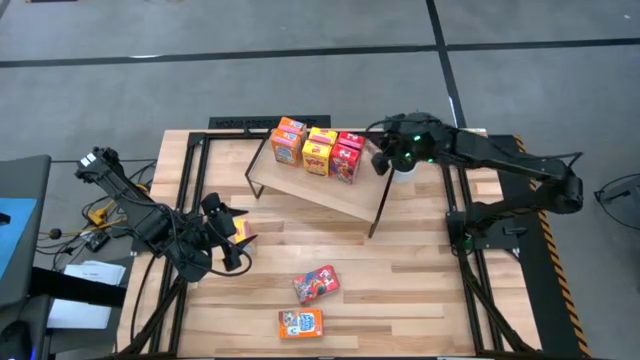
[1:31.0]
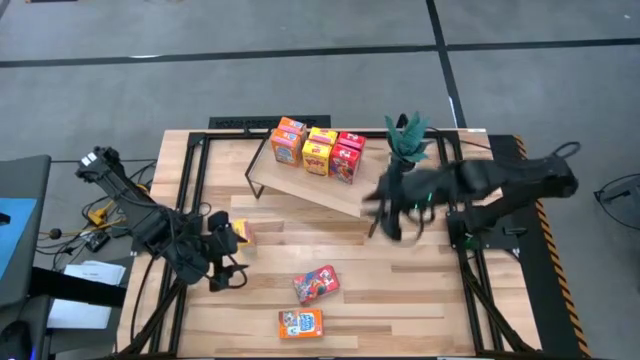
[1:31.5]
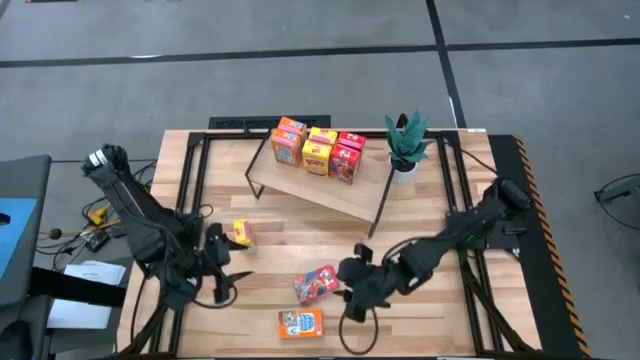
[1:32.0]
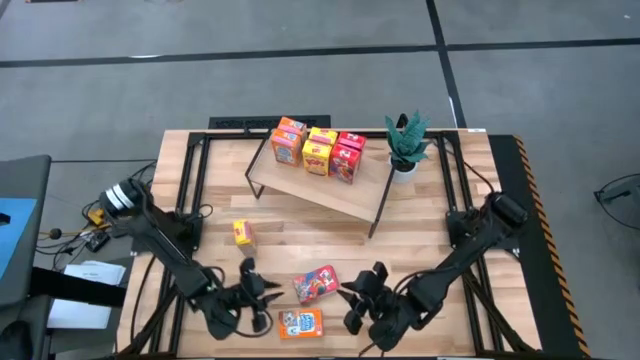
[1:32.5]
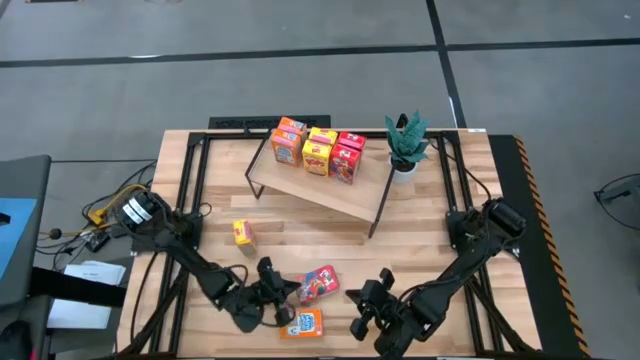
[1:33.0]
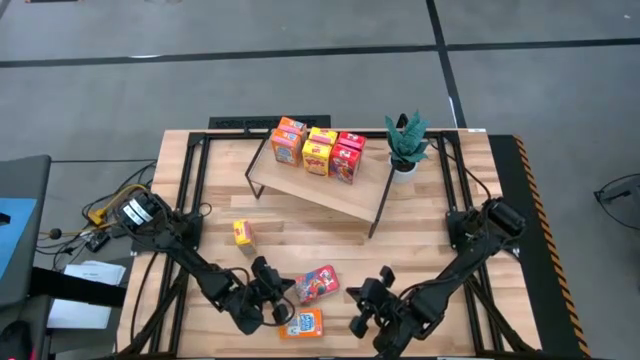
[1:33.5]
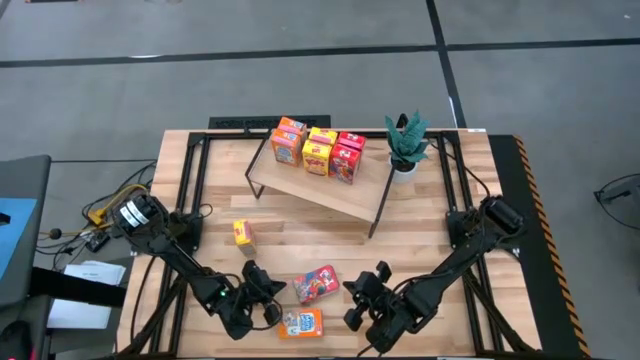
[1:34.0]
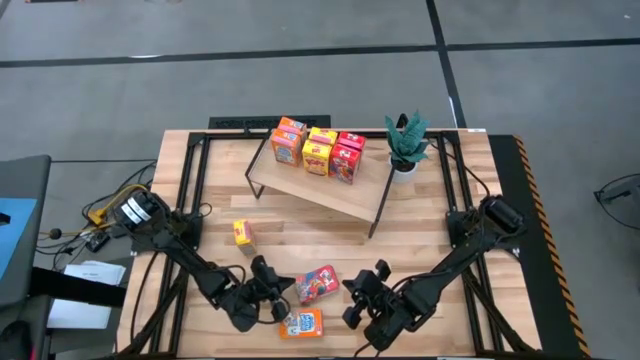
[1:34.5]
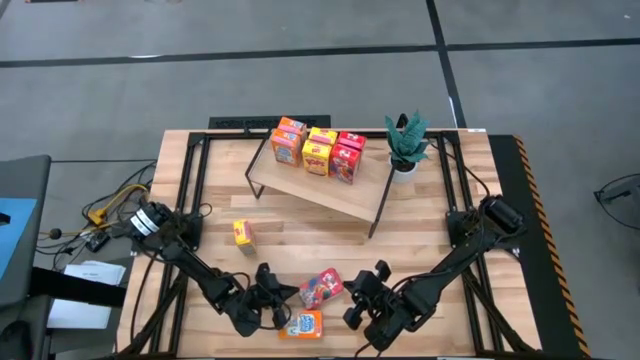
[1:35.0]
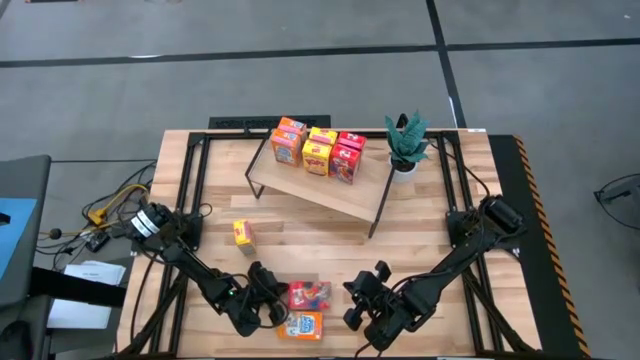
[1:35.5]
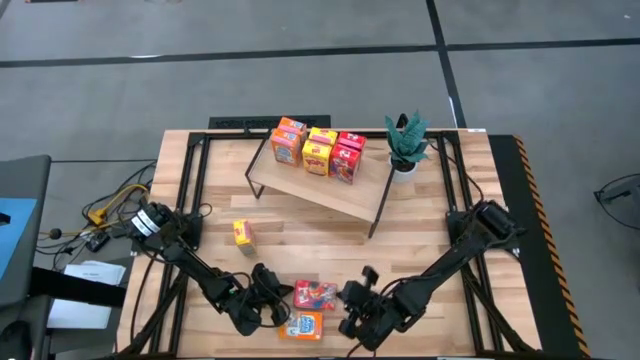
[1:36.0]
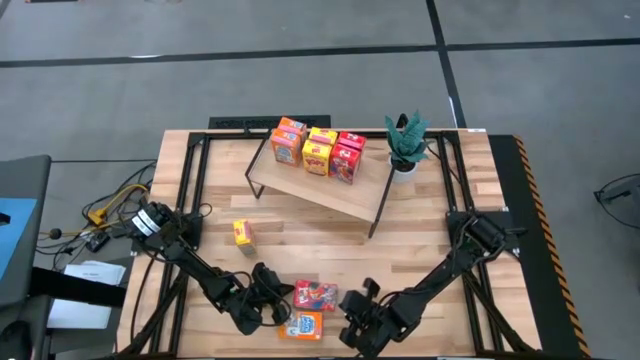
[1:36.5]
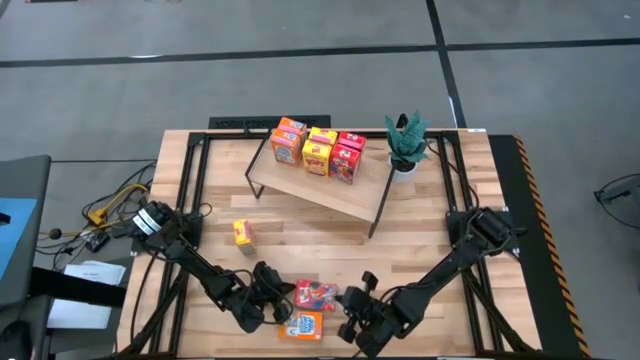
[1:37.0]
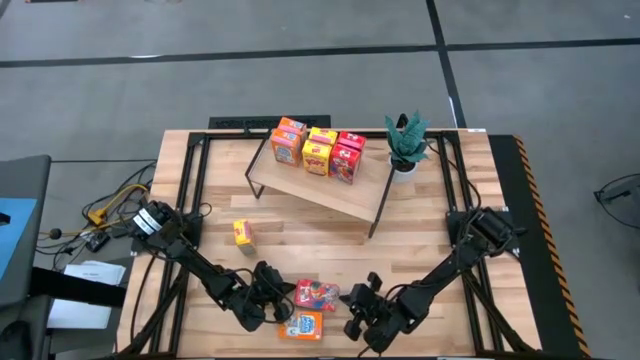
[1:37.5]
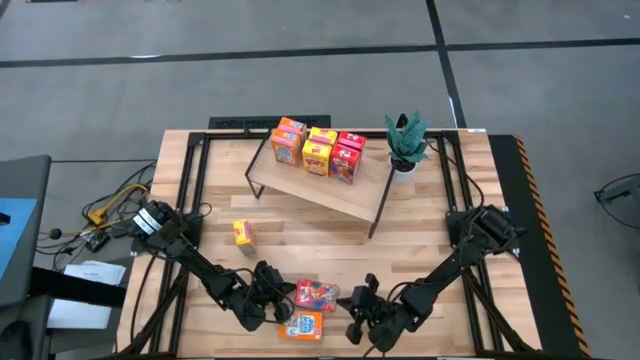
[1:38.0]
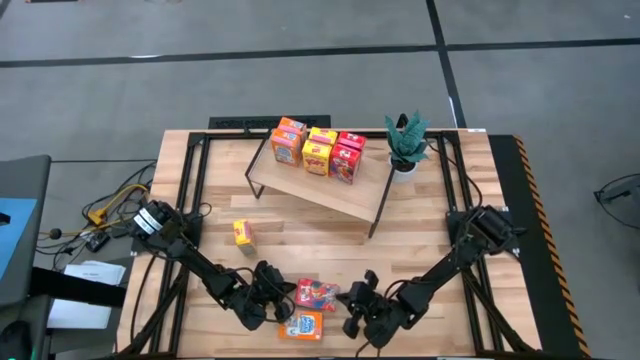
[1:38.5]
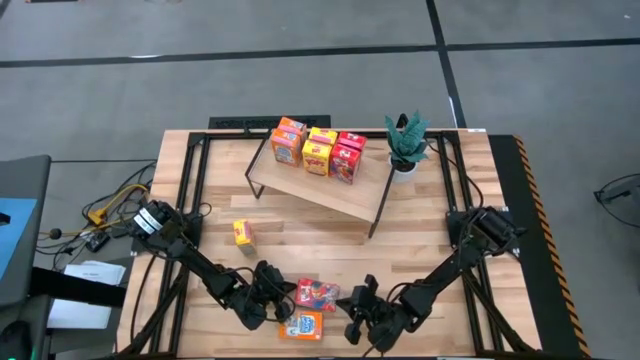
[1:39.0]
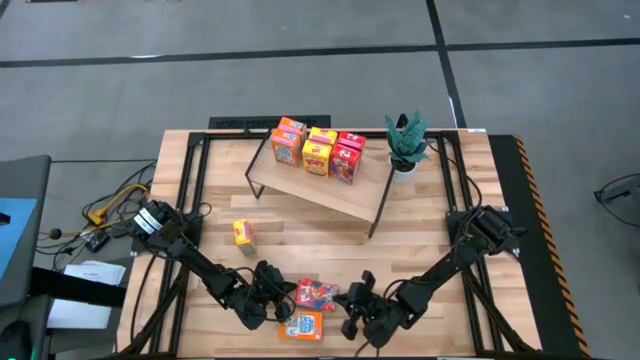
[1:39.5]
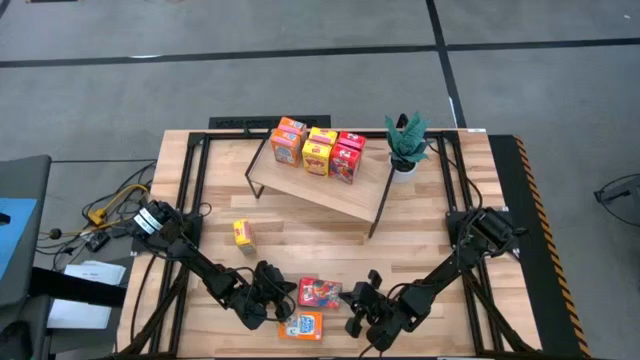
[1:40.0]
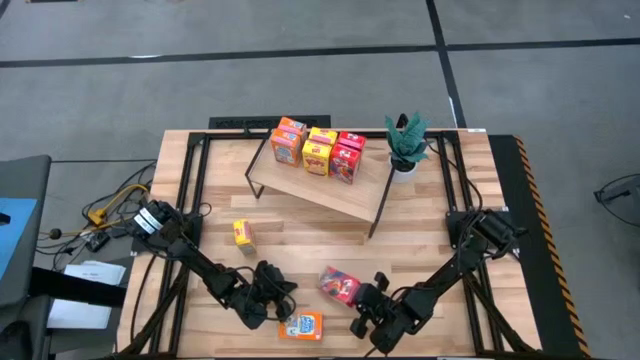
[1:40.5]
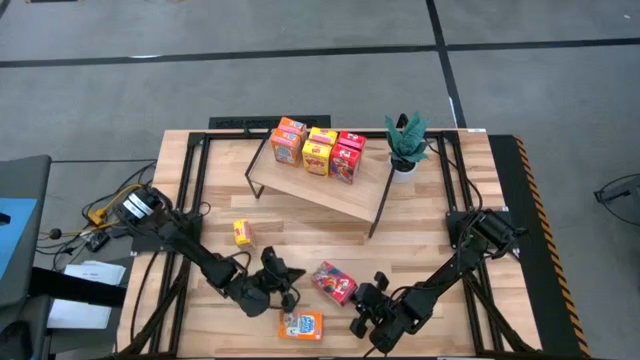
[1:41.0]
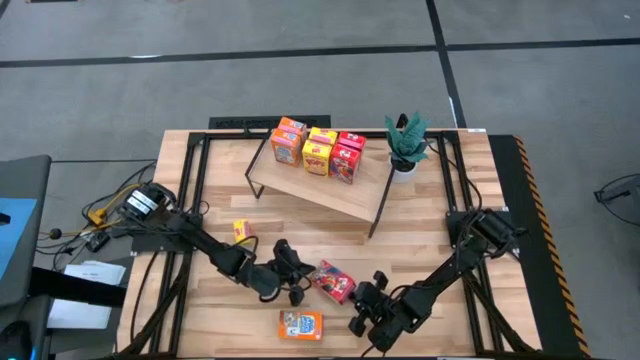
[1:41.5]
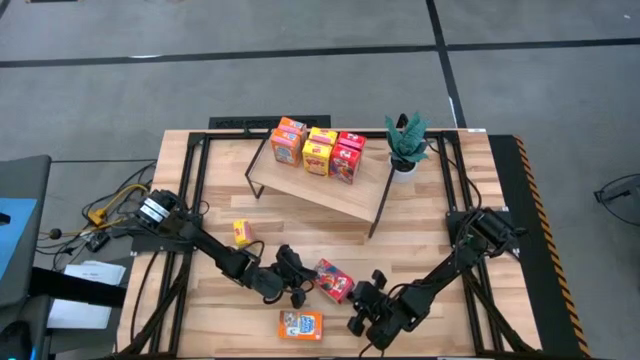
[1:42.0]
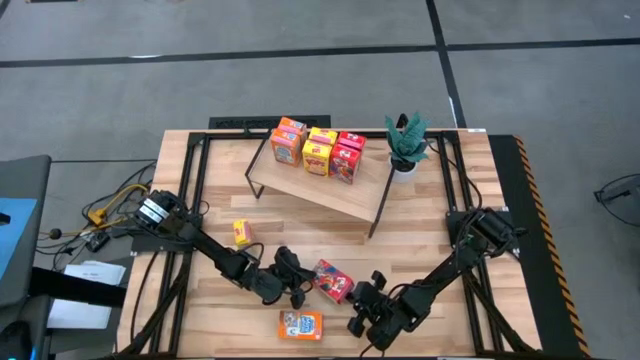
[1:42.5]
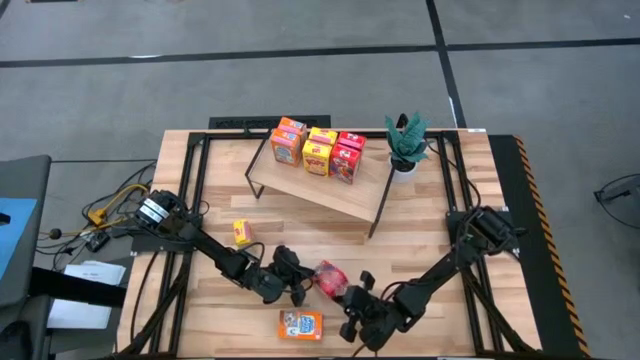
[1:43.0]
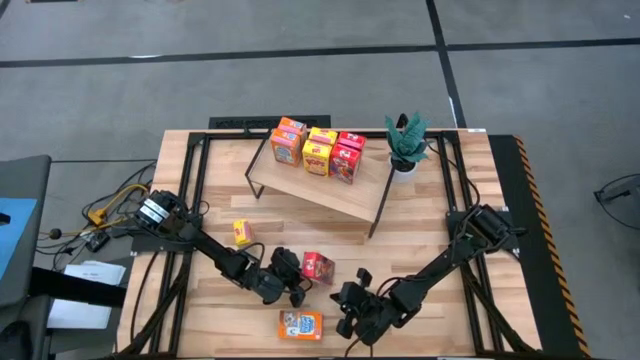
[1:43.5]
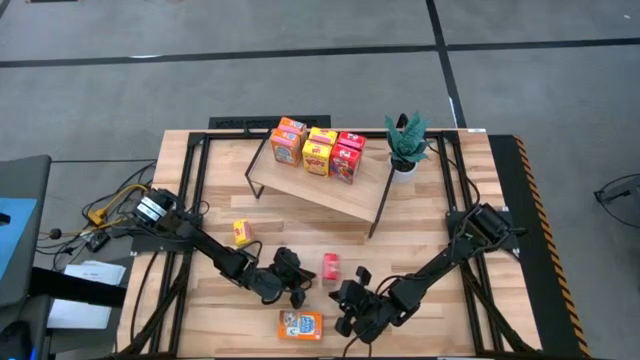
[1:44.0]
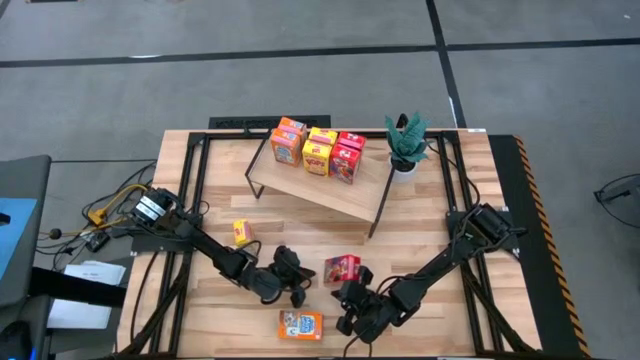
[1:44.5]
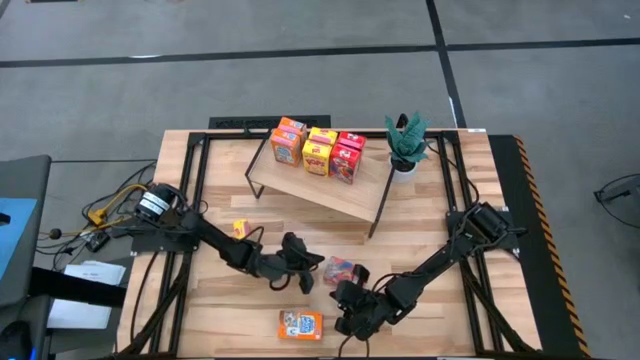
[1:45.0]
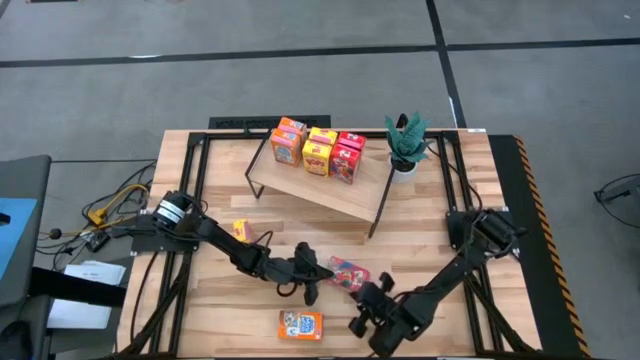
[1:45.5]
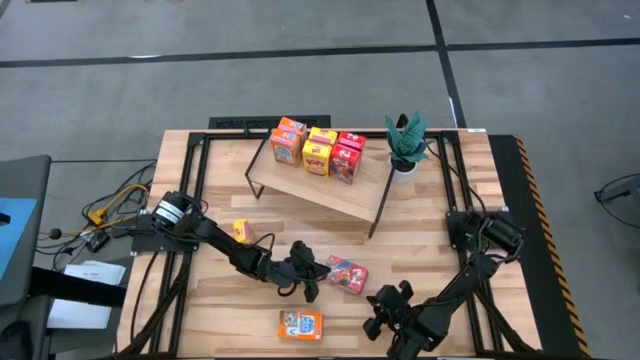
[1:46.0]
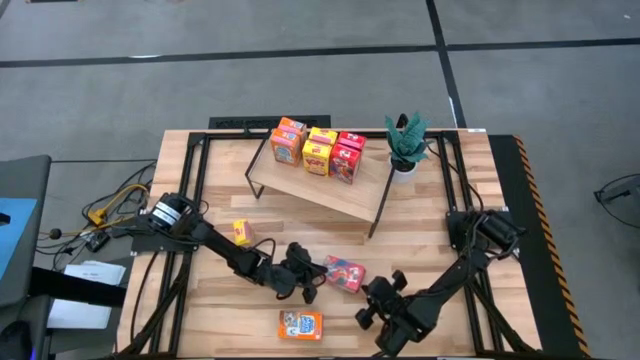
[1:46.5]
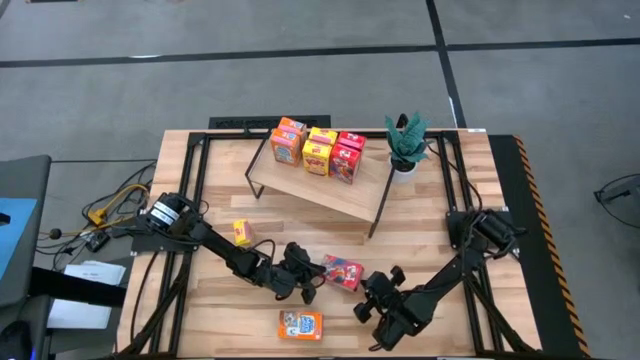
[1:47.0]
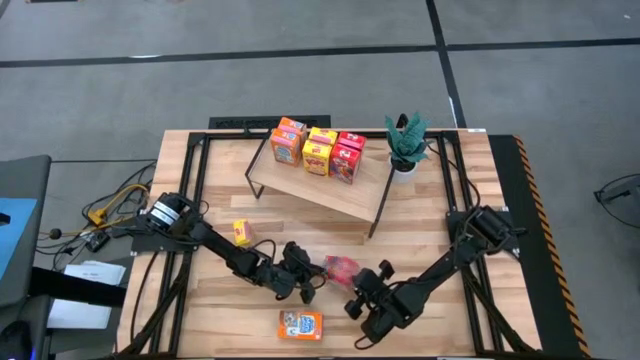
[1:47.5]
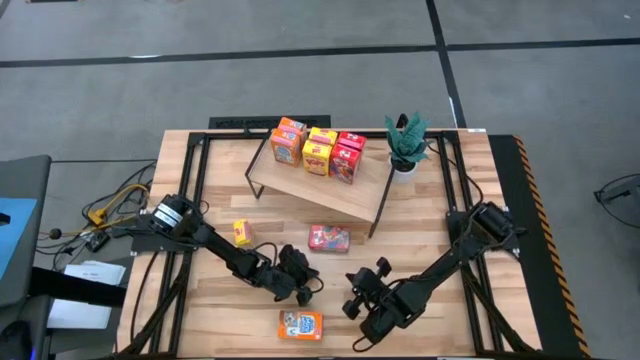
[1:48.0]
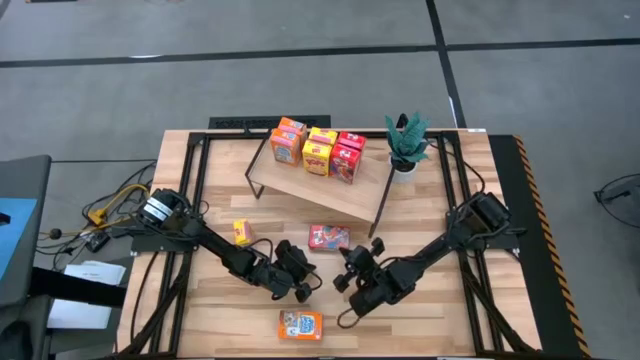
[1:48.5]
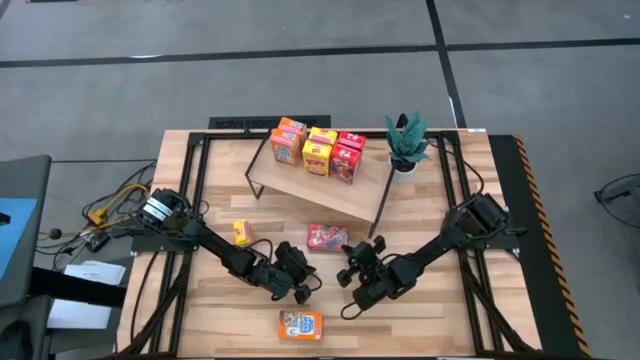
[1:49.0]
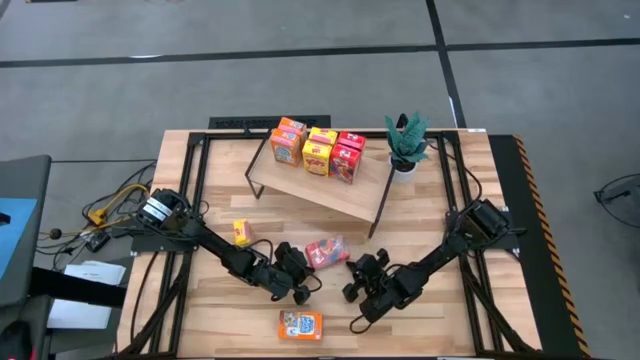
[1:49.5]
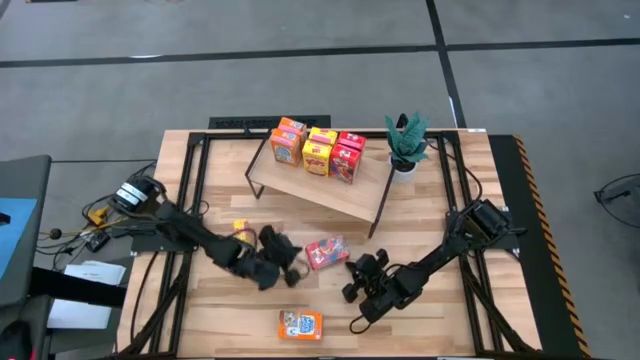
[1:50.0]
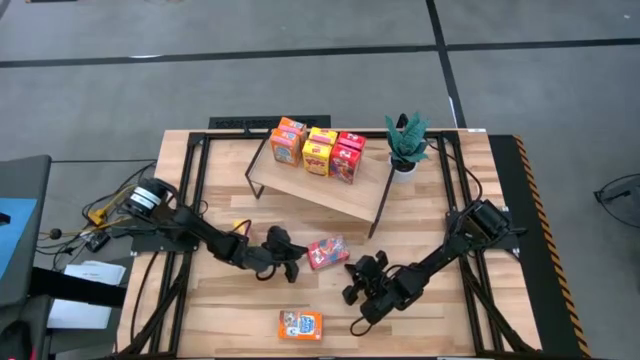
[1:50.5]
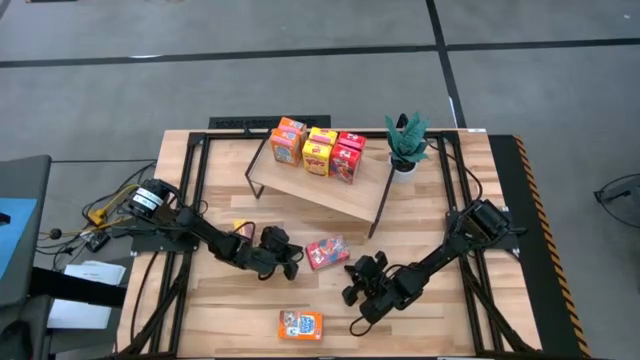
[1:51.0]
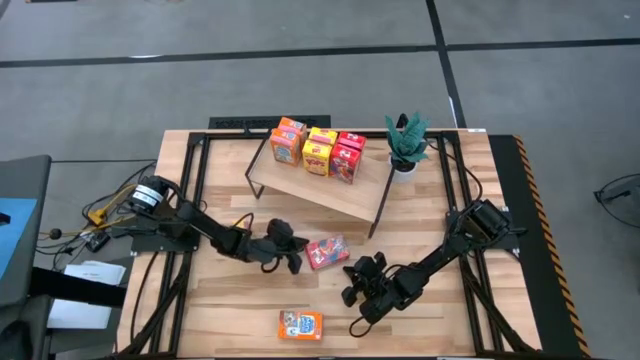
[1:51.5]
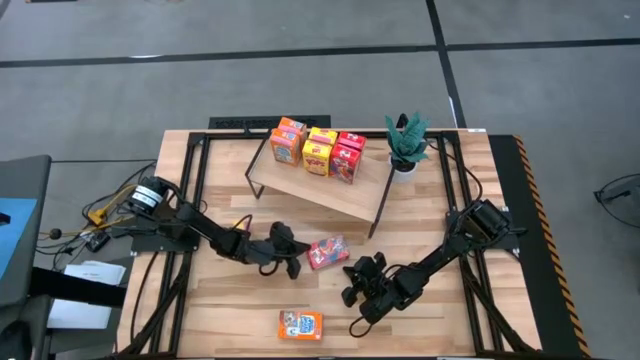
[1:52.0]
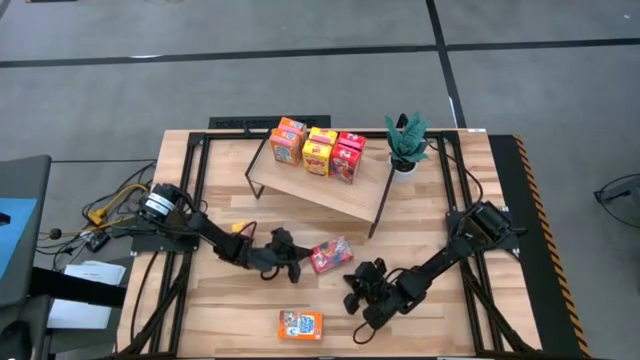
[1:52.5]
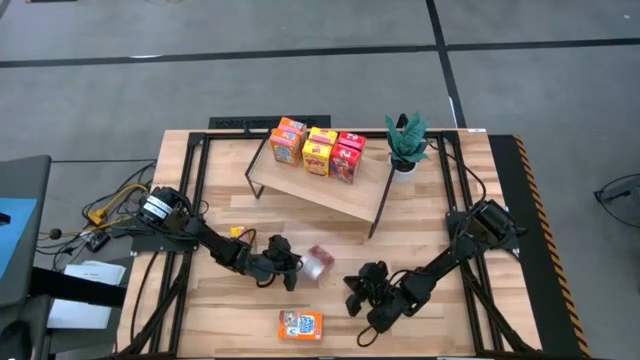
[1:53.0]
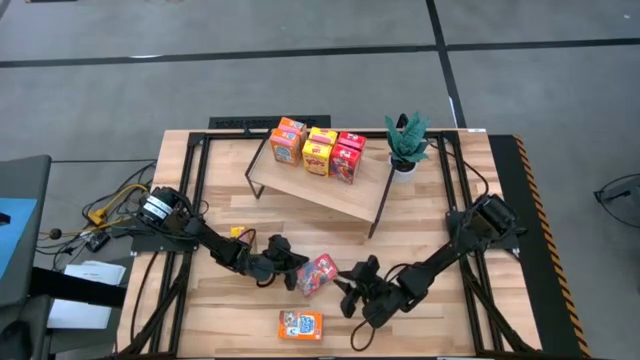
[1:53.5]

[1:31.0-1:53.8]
Task: Stack cereal on shelf
Put red cereal box on the table
